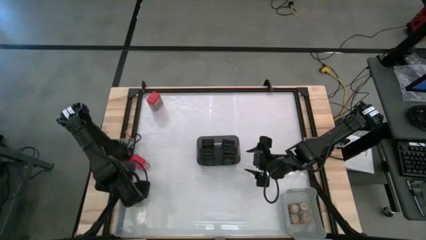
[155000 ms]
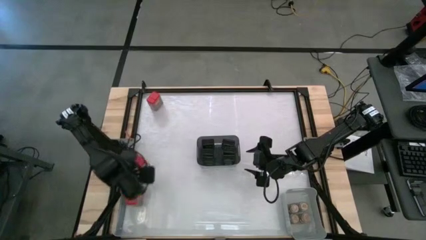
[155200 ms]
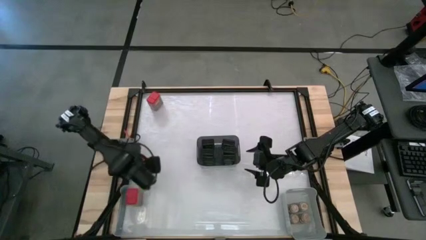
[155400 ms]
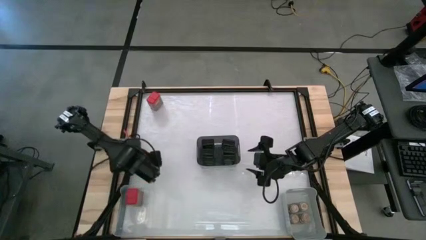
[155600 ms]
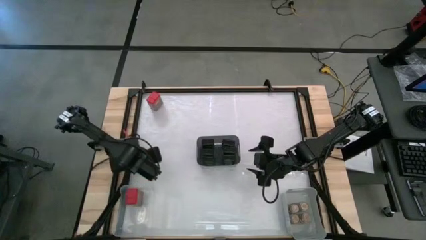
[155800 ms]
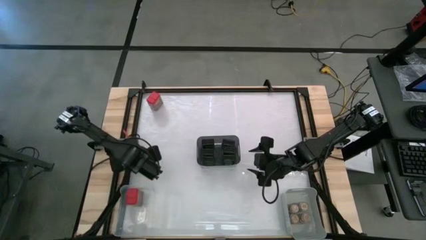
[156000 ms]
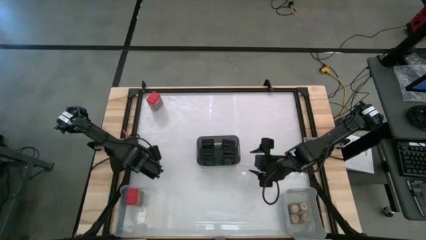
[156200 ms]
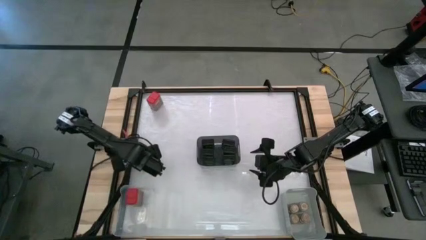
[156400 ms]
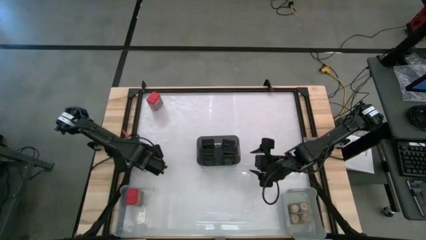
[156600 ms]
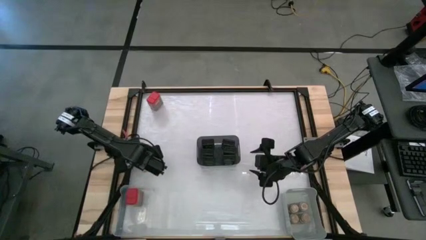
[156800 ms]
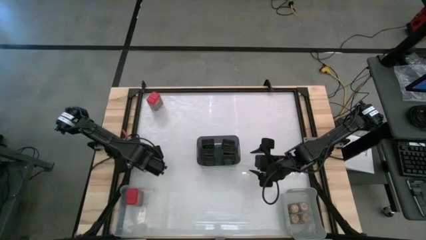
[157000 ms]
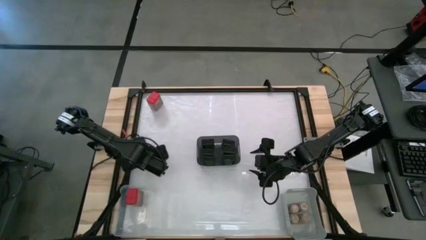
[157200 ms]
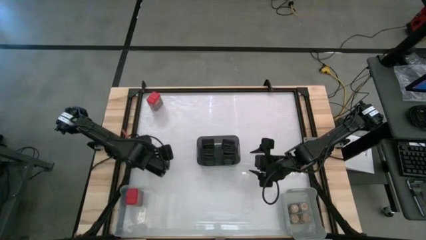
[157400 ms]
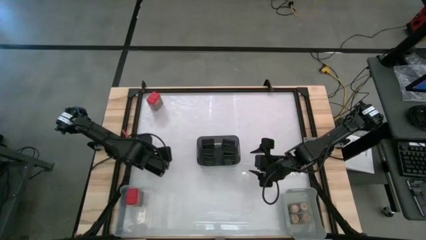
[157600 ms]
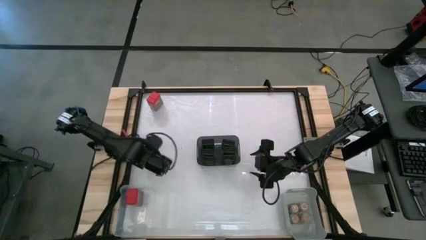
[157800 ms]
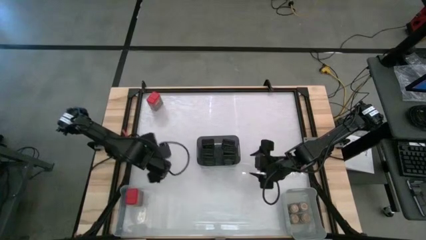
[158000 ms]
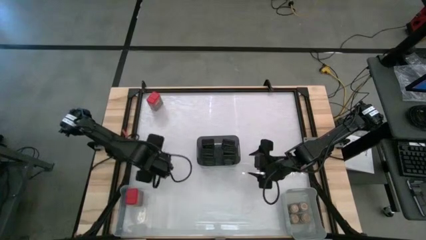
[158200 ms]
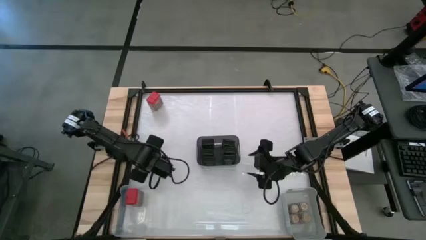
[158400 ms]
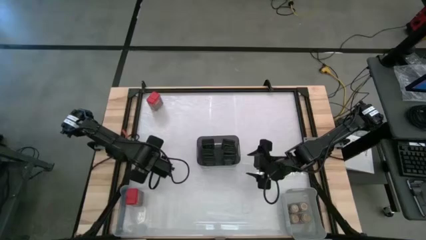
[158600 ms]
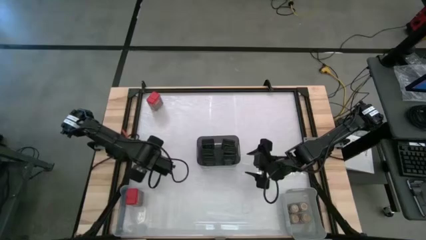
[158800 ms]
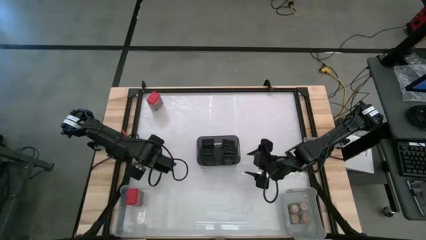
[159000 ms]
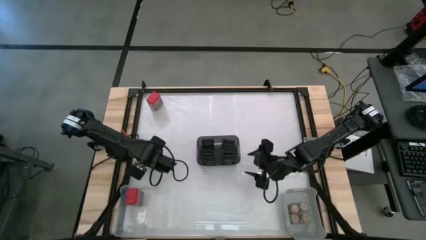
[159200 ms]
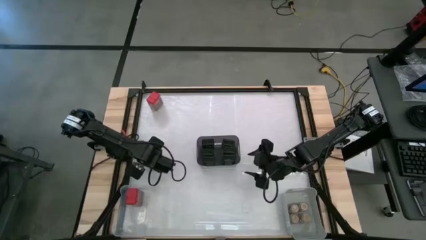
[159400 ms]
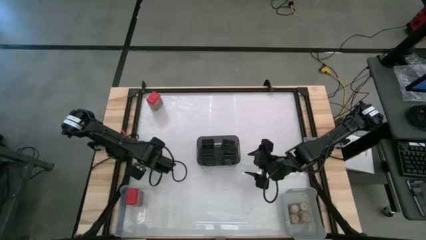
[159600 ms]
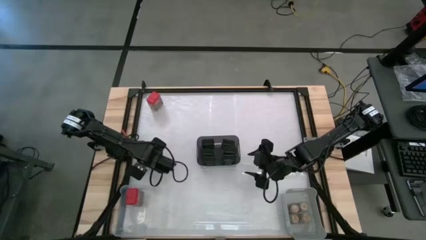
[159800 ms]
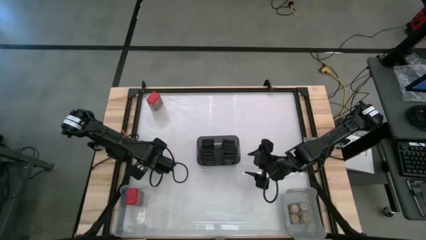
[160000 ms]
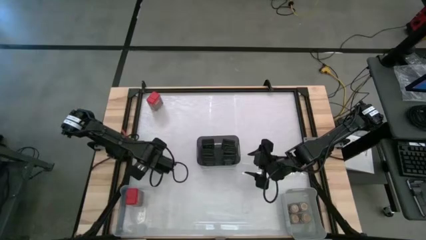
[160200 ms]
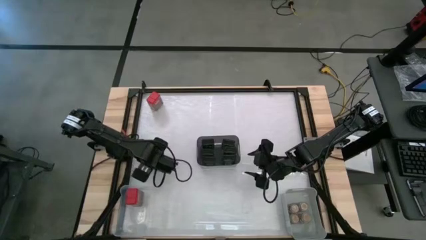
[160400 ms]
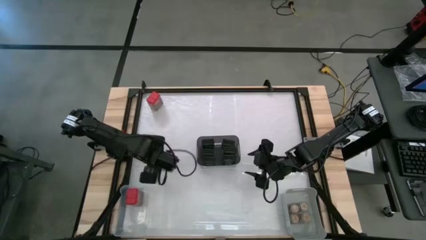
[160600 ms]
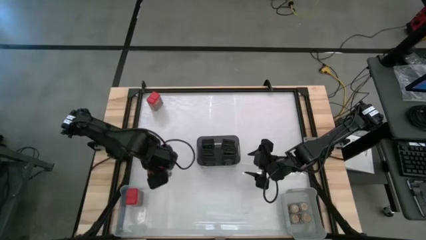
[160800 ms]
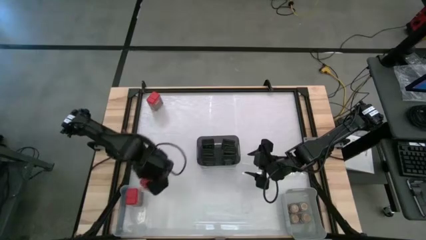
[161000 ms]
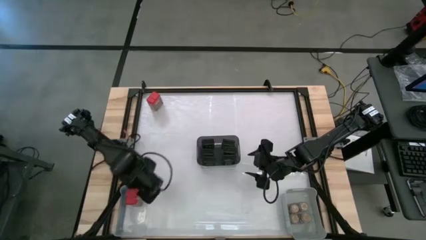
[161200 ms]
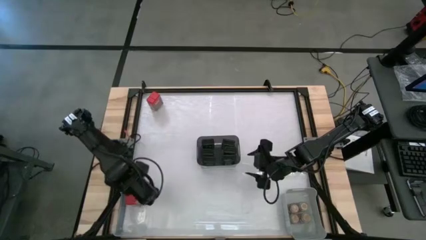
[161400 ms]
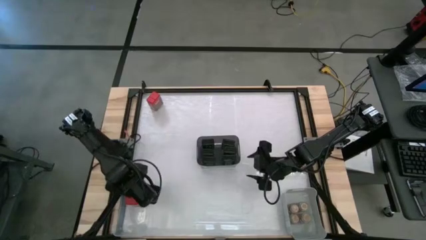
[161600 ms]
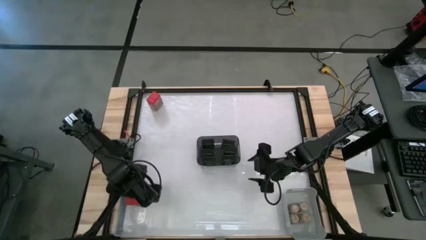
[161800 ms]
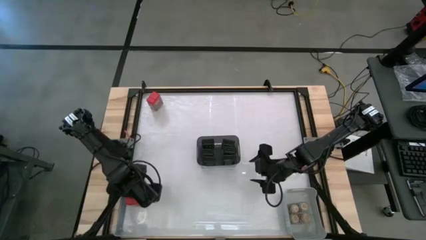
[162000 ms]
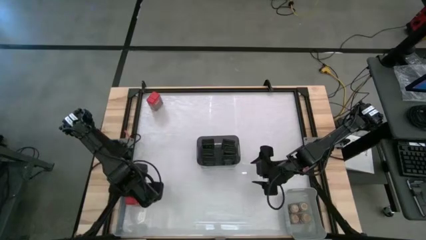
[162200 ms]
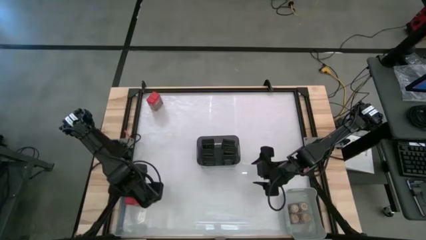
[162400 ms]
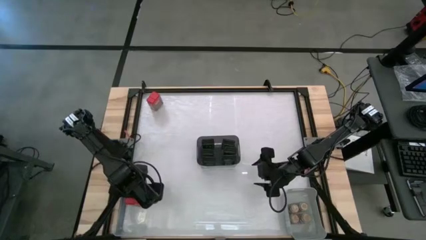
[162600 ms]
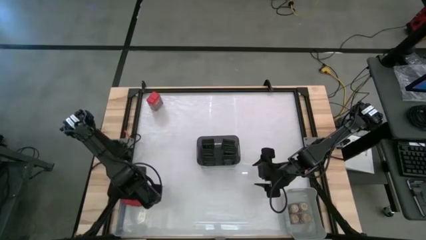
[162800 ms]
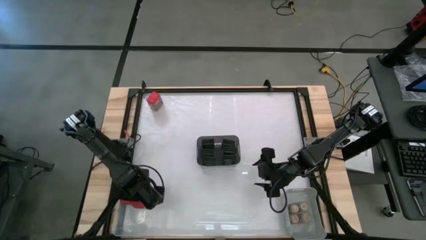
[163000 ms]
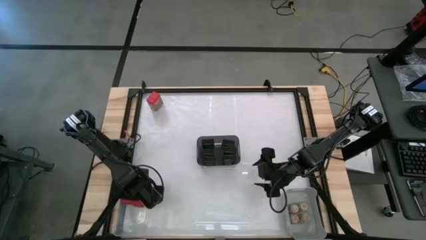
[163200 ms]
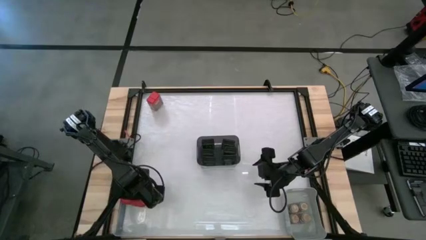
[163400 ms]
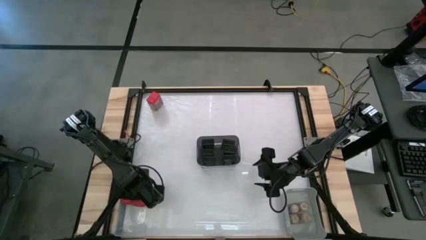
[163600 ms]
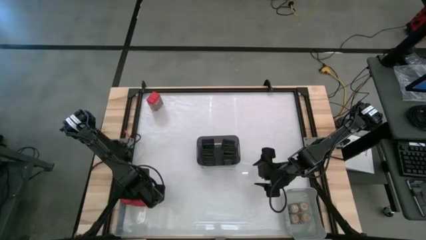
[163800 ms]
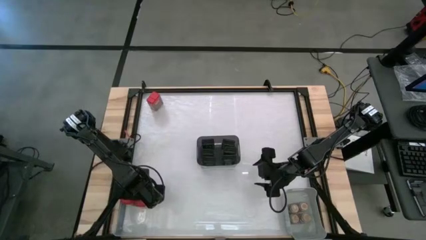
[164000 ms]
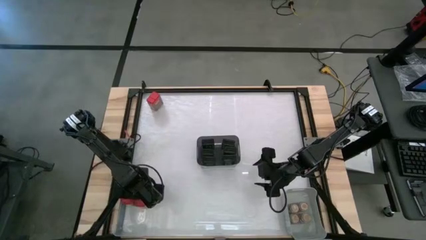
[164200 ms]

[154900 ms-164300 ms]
Task: Sort spices by type
Put the red seasoning can into the transparent bin

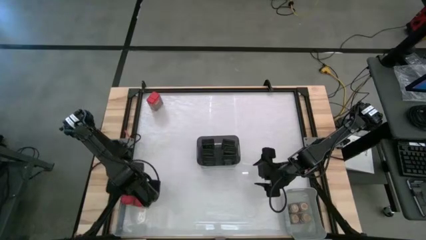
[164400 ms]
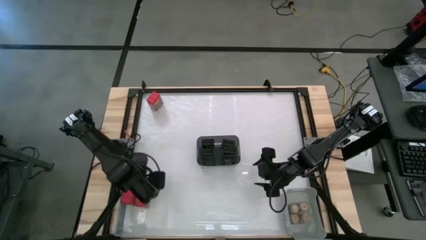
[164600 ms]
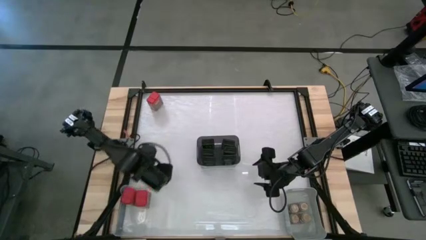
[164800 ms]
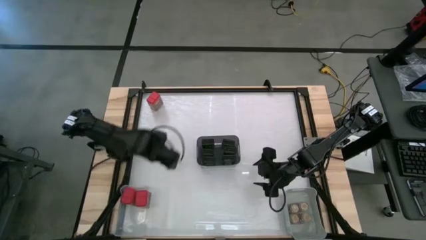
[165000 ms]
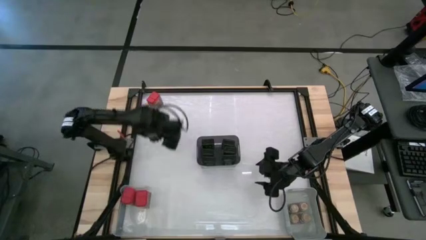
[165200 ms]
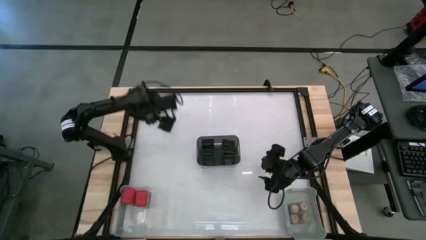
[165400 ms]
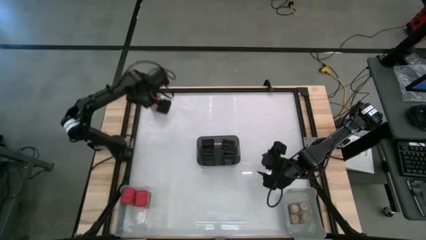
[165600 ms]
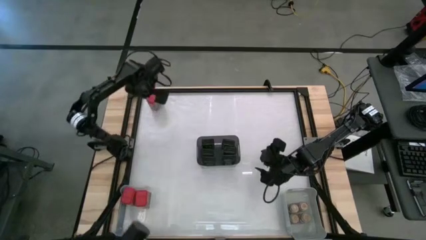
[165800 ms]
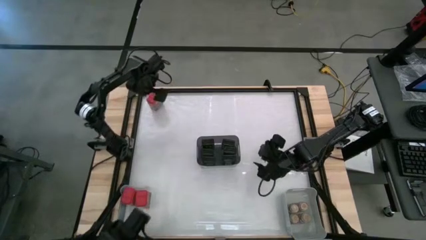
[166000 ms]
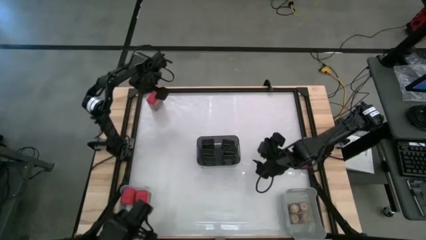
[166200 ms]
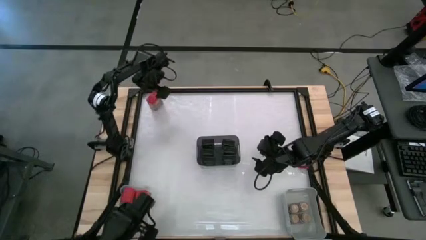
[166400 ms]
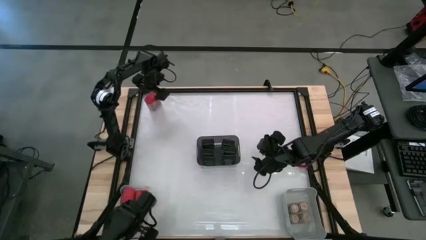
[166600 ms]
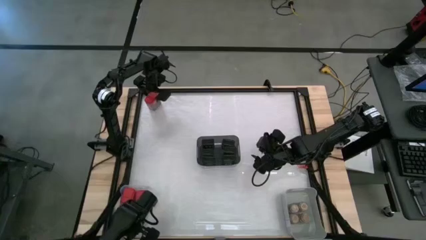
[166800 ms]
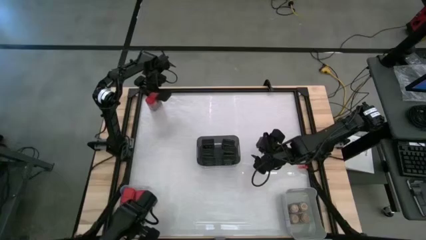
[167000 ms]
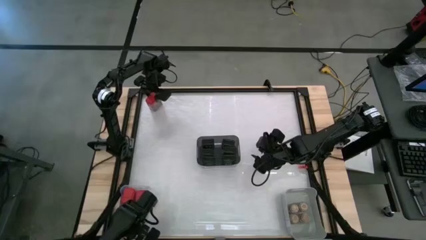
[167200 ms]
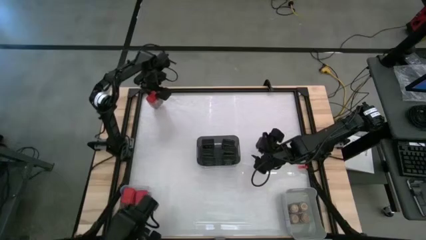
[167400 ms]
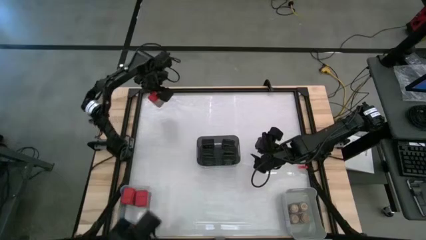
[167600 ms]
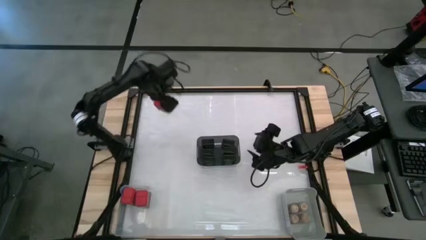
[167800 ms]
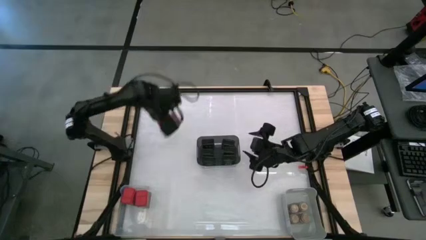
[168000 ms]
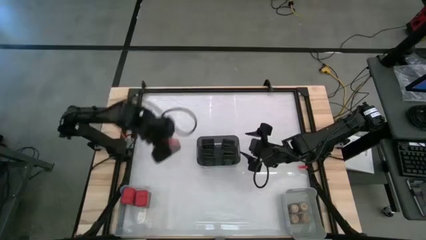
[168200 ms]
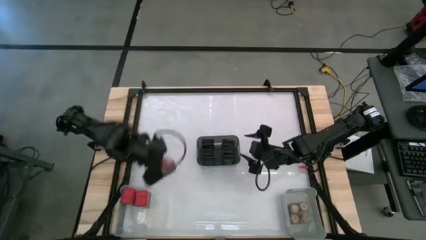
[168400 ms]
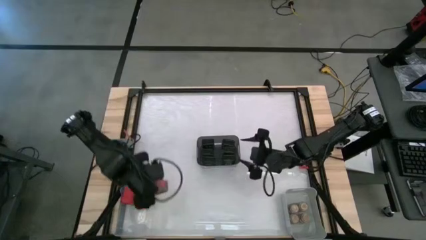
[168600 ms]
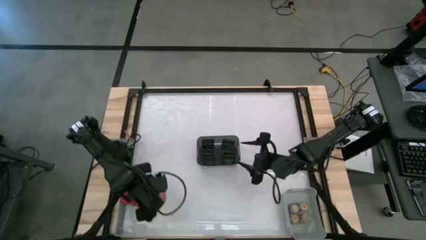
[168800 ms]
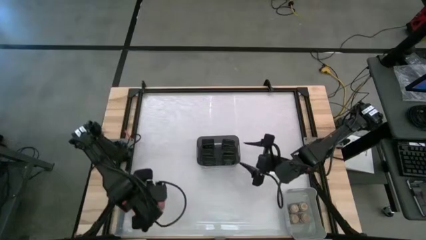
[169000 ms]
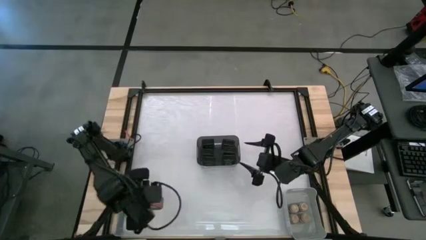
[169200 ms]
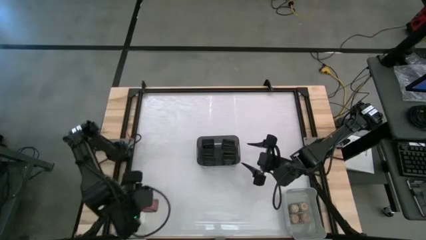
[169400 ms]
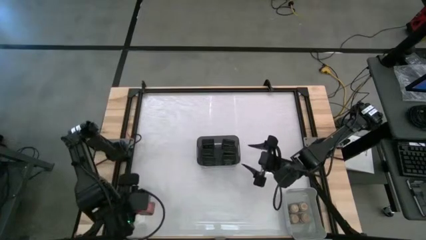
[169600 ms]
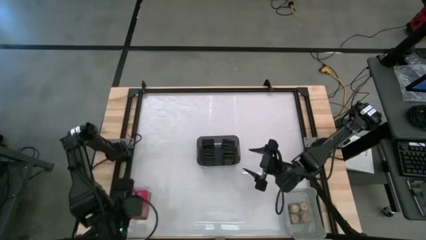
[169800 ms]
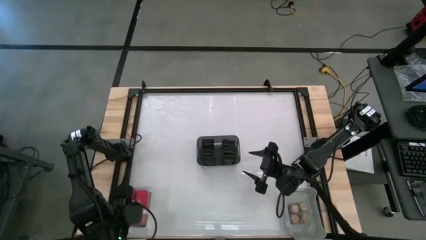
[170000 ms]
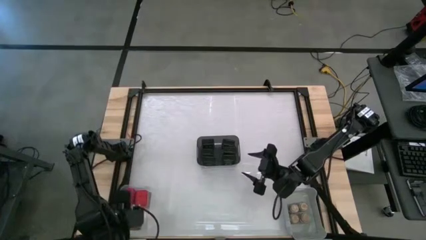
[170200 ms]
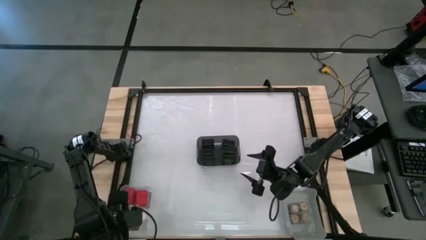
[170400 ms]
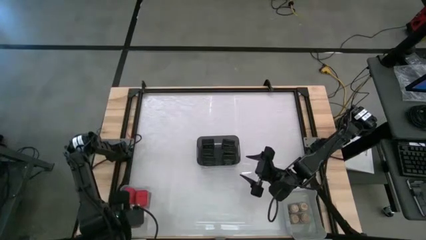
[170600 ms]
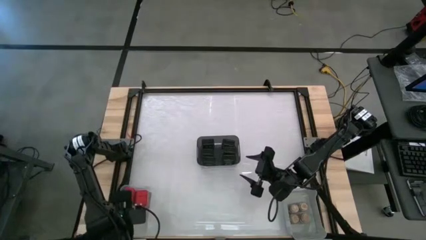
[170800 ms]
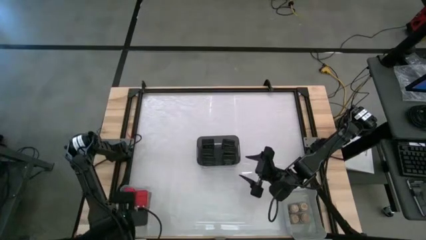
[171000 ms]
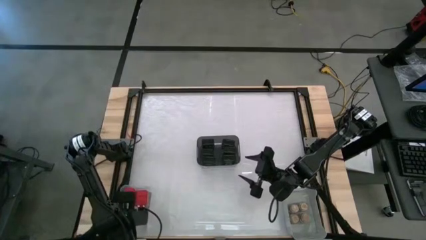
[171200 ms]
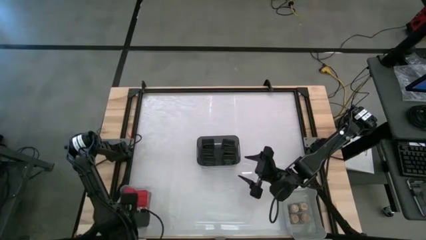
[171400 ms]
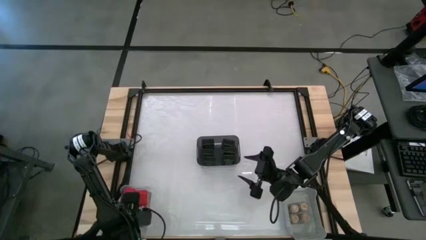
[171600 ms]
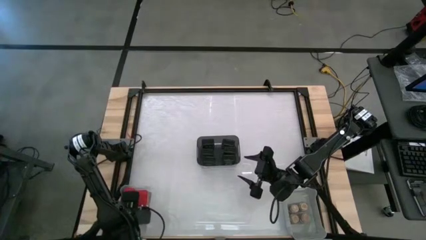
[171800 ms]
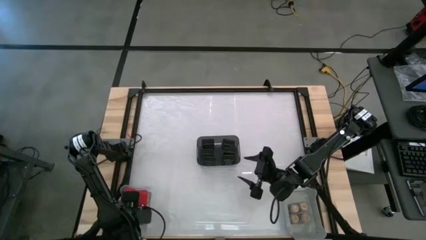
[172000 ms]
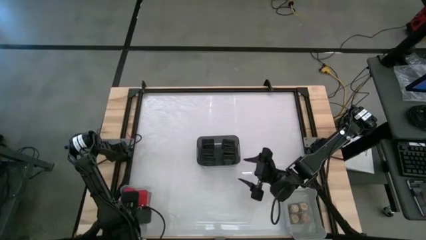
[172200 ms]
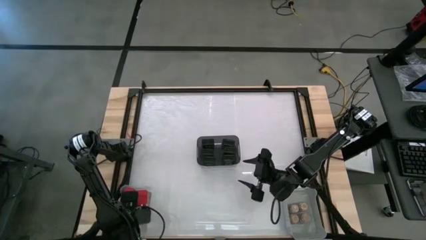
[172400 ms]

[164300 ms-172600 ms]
Put the red seasoning can into the transparent bin
